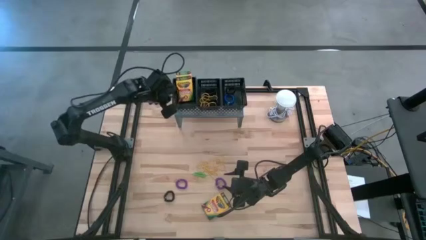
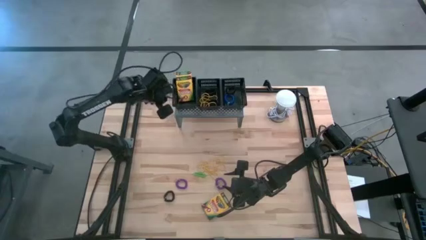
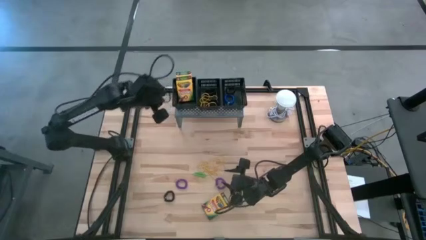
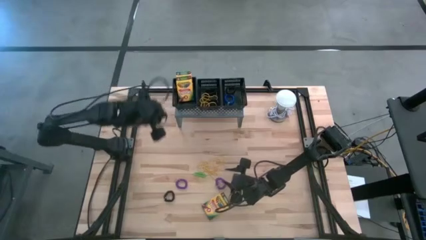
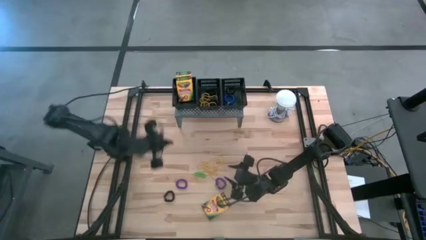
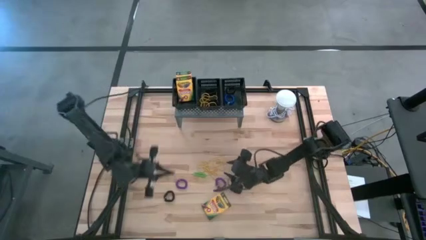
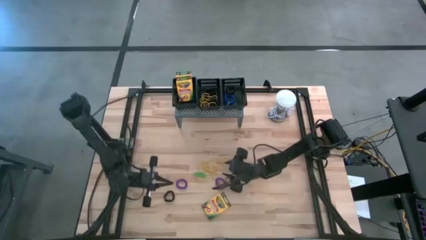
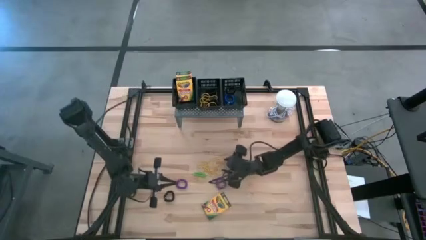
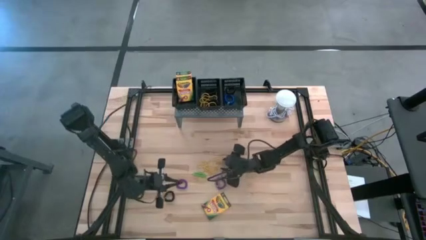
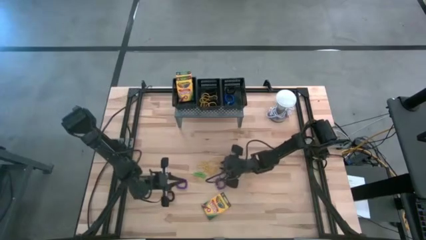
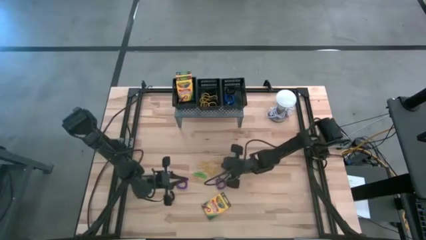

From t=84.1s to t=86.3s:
Task: Pick & Place Office Desk Supplies
Put the yellow rubber band in the middle black bin on the shelf

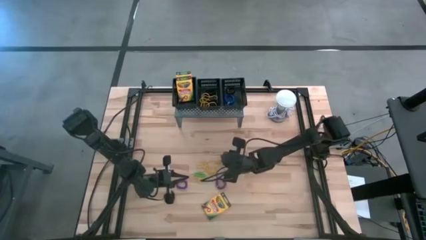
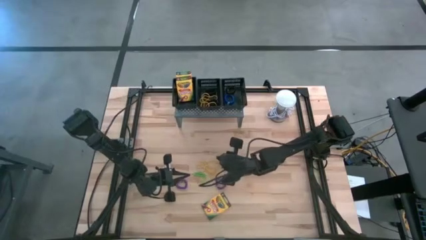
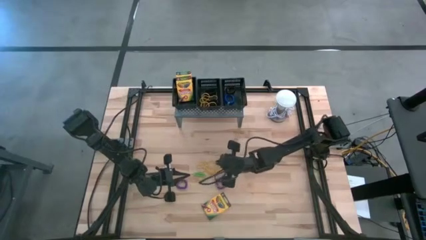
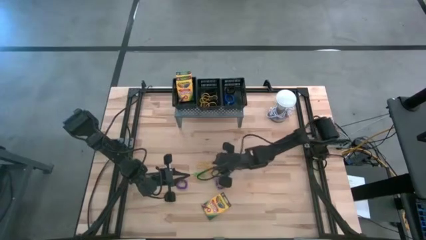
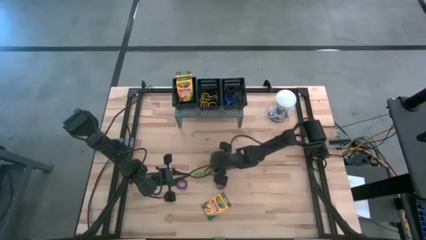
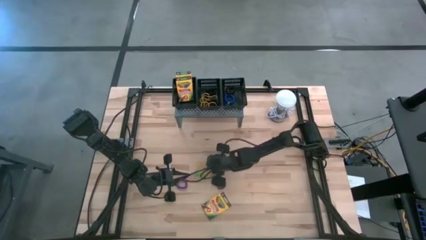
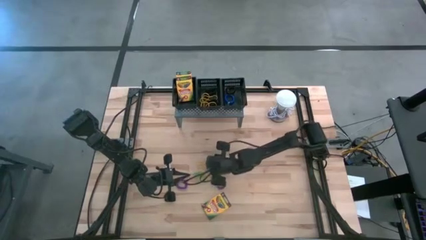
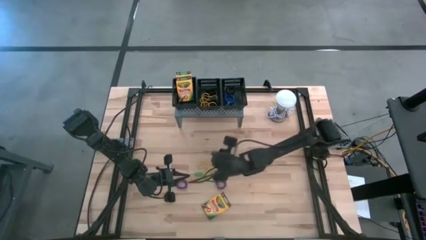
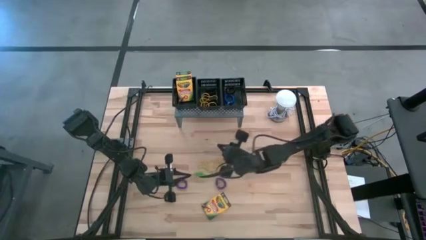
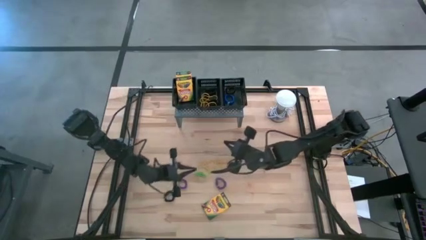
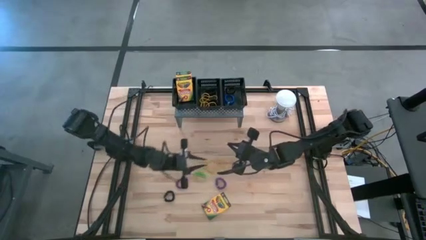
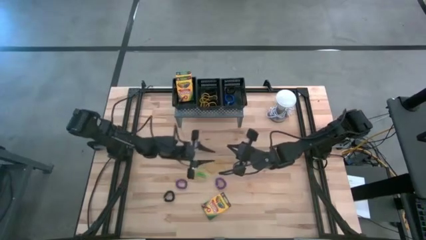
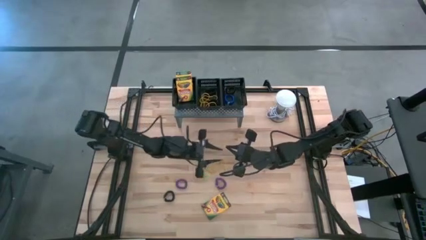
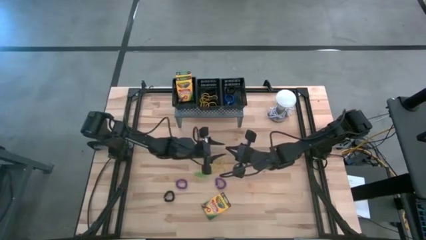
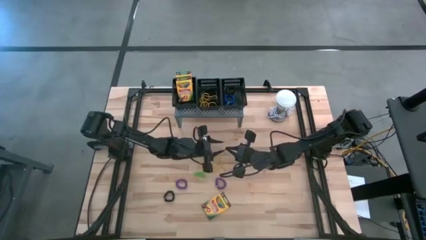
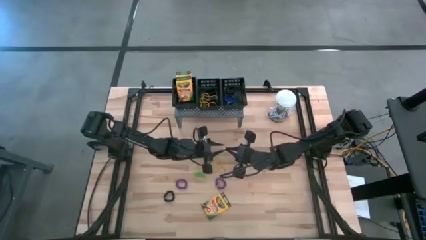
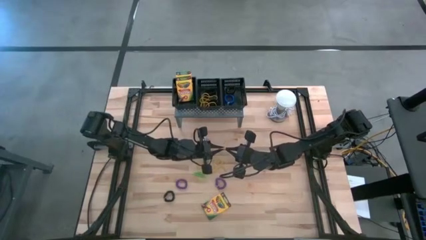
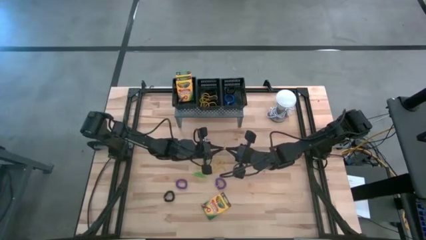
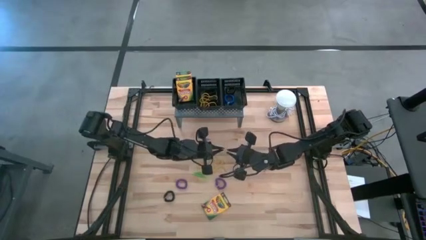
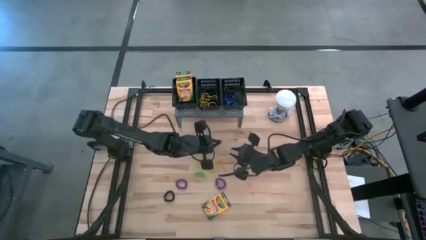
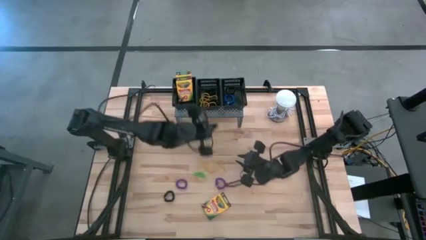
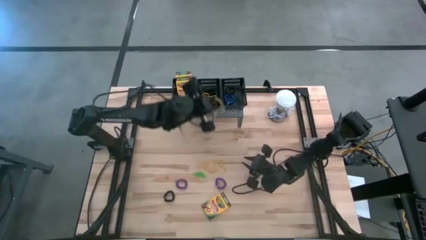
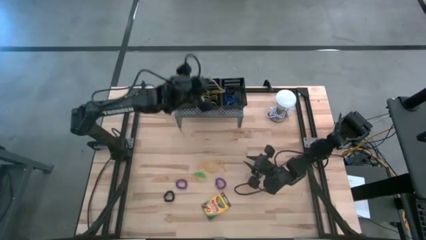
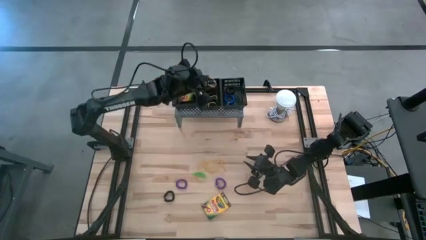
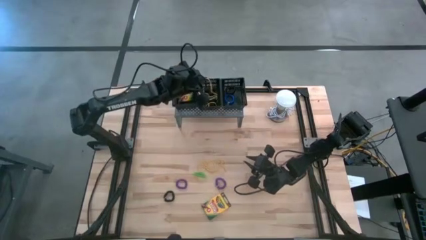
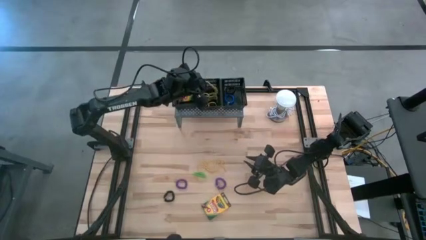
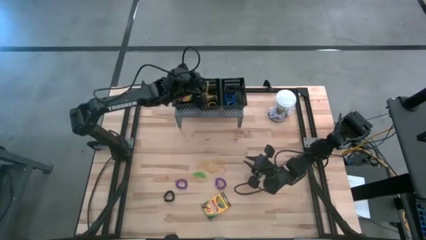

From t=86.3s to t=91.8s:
Put the yellow rubber band in the middle black bin on the shelf

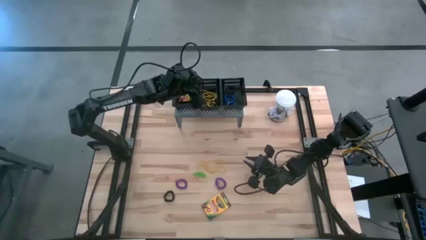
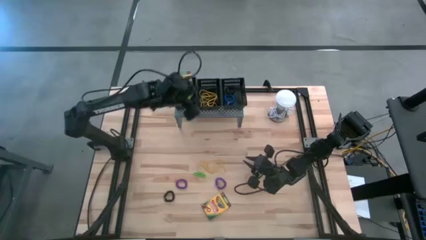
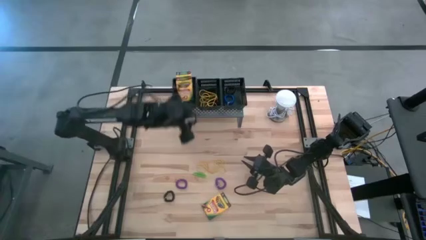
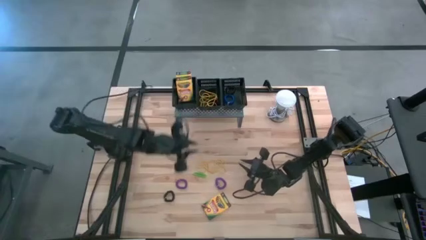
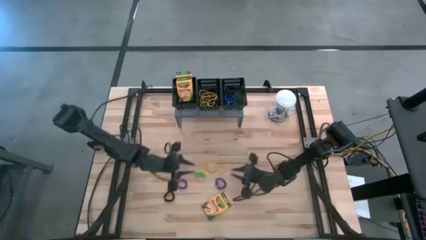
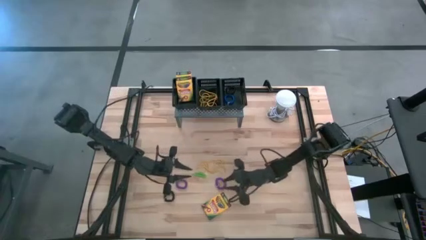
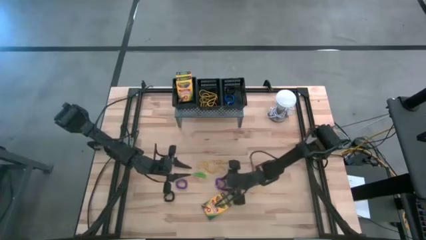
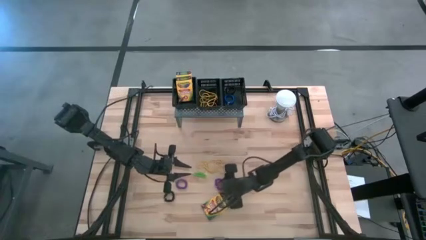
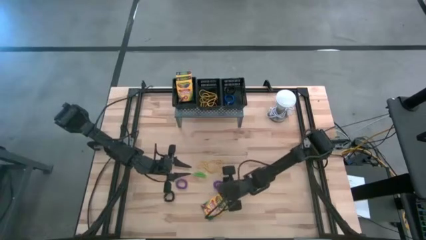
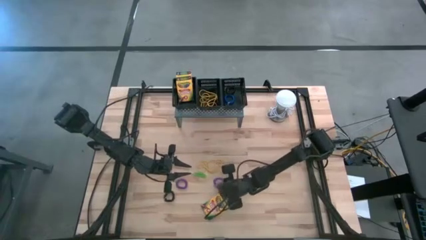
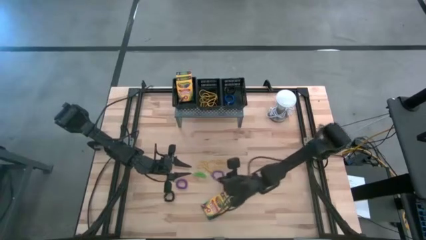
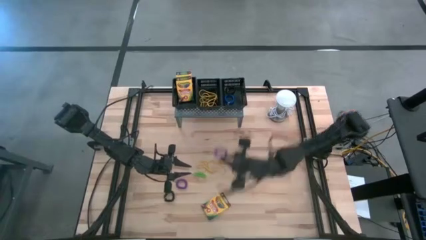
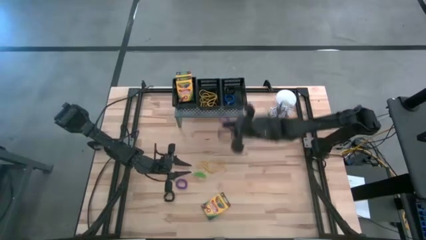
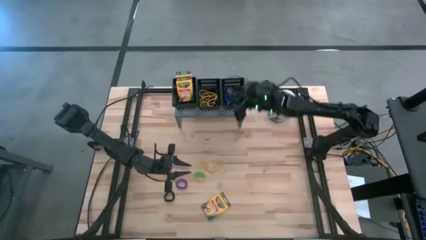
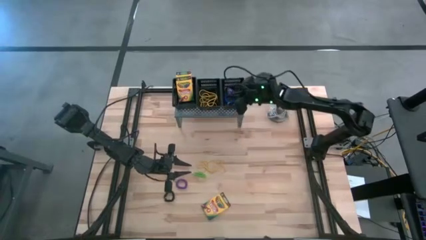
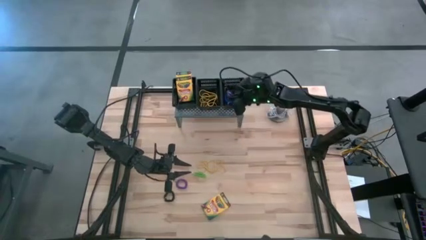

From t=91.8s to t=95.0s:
Put the violet spring keychain in the right black bin on the shelf

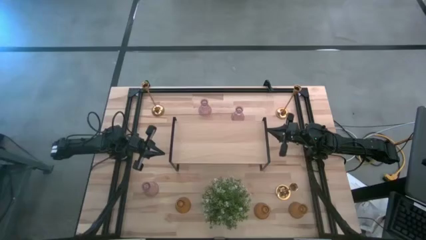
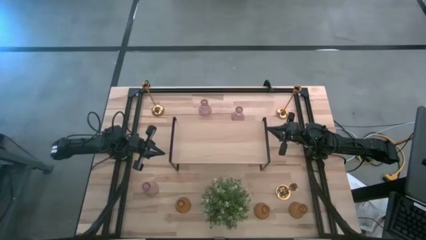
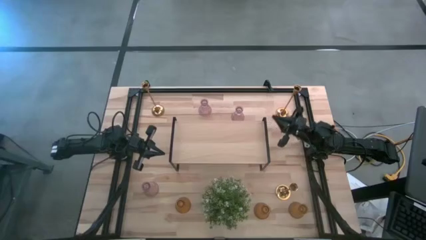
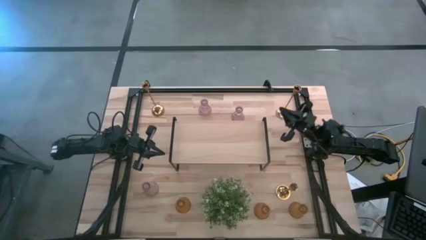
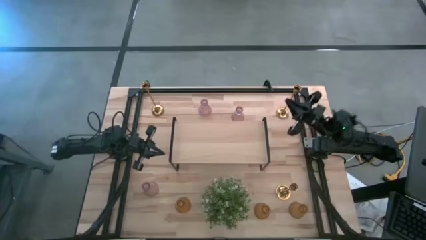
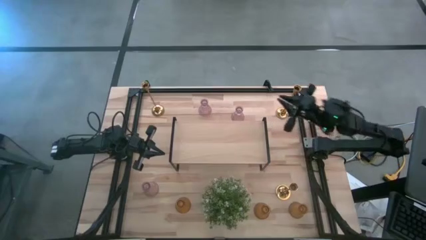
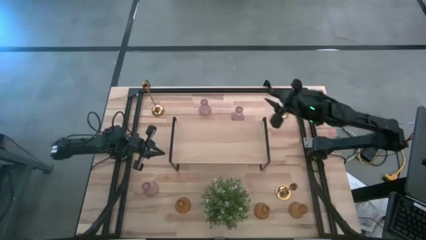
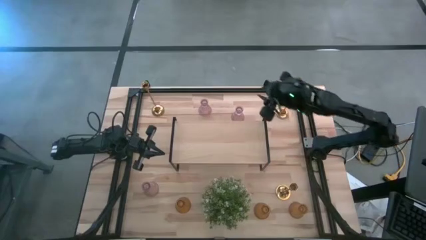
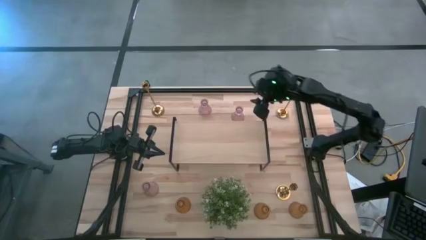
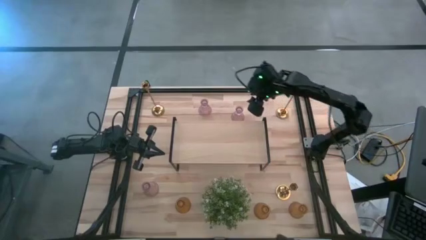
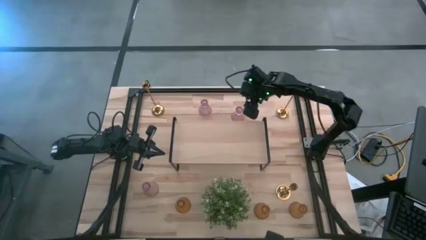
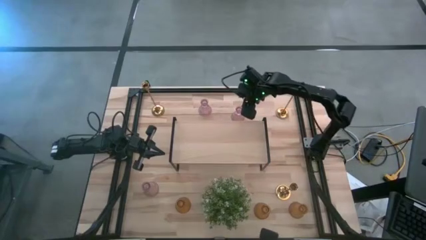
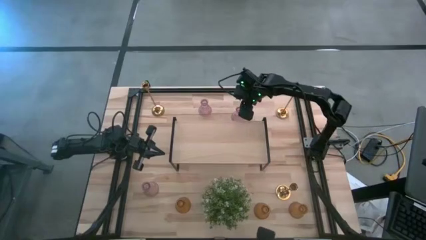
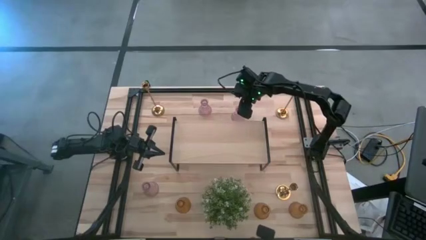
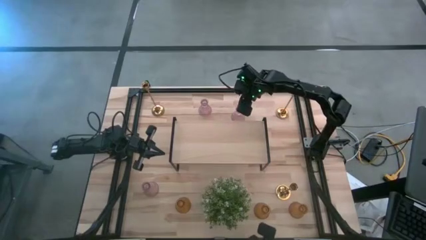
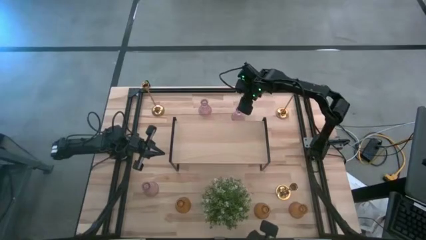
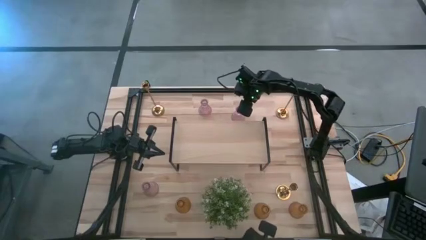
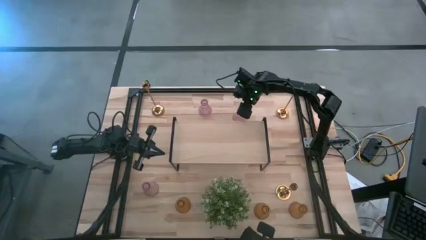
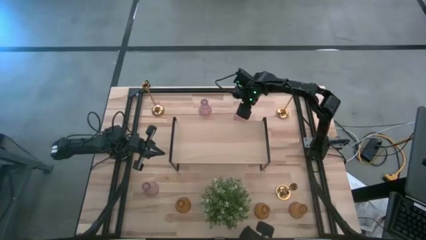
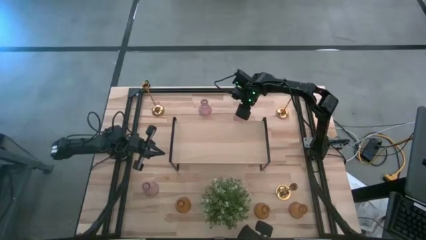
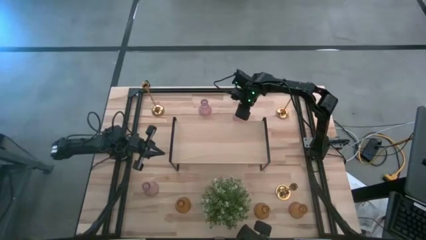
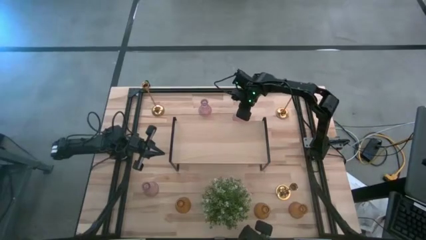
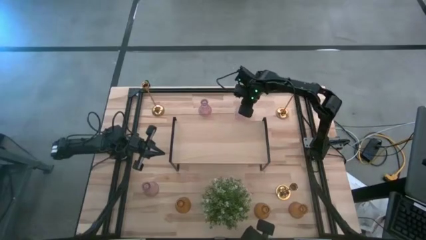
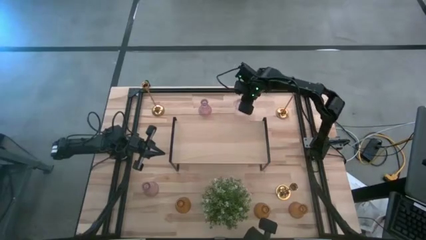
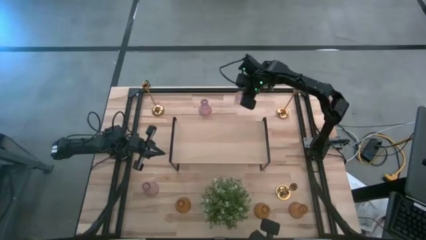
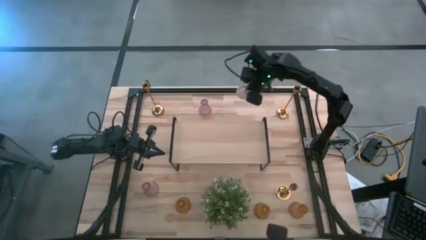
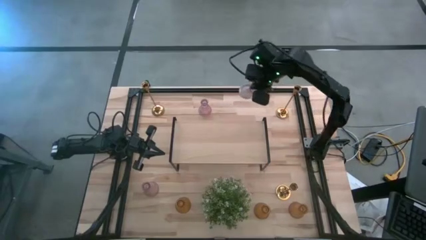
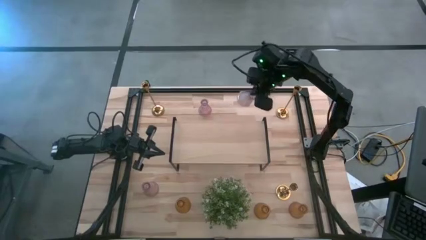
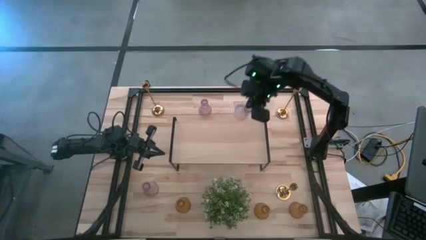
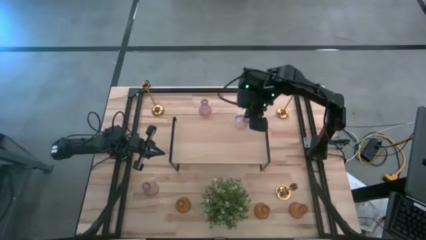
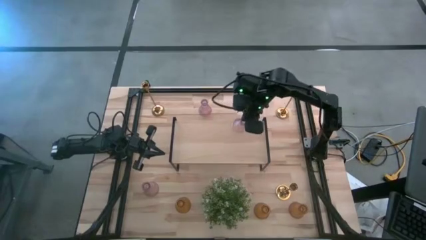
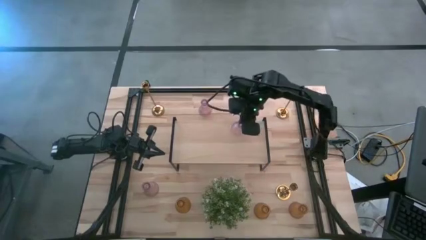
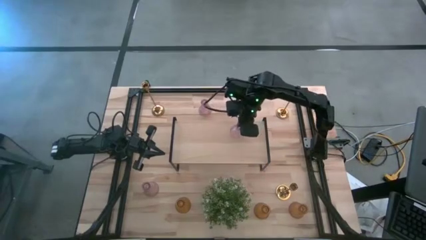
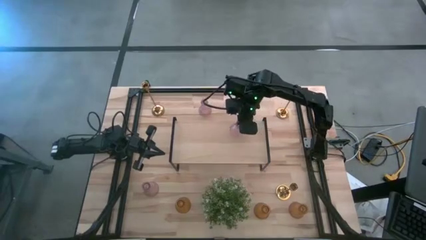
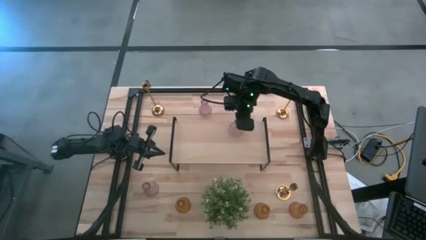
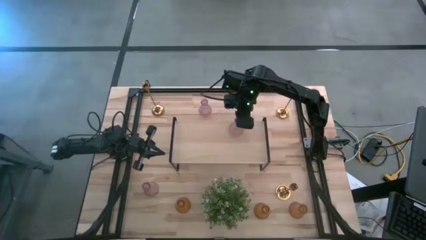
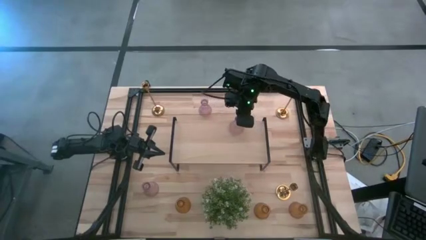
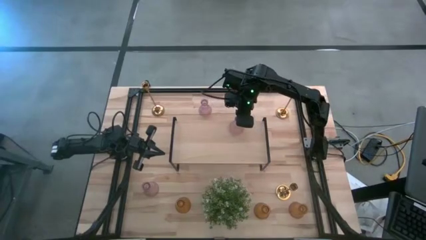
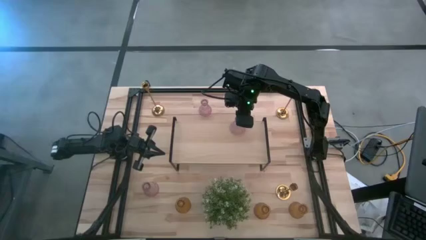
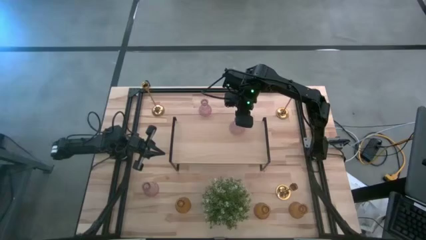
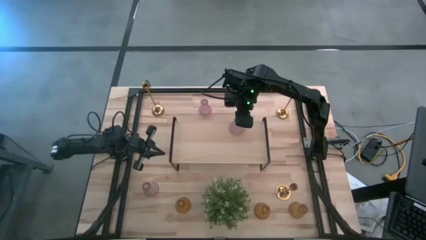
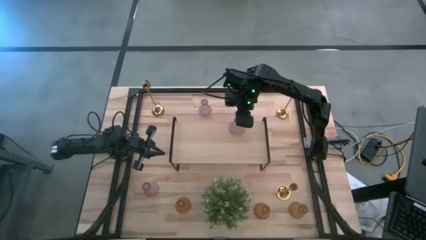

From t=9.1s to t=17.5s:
Task: Pick & Place candle stick holders
Put the top right pink vase on the shelf
